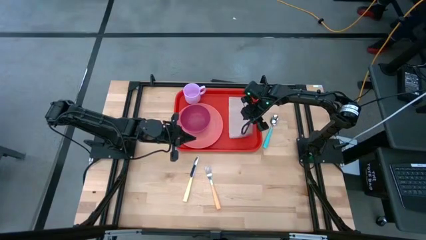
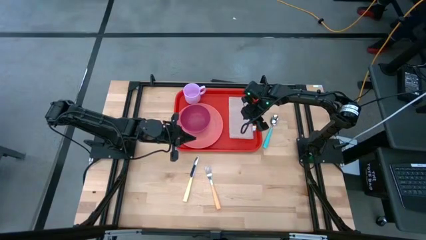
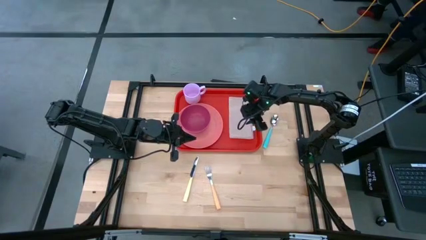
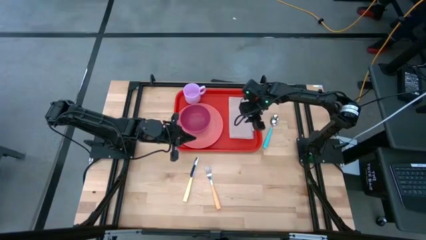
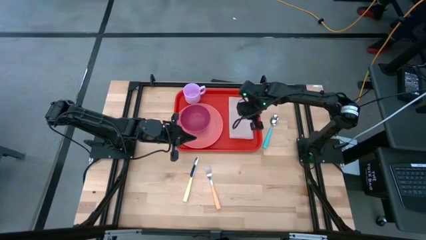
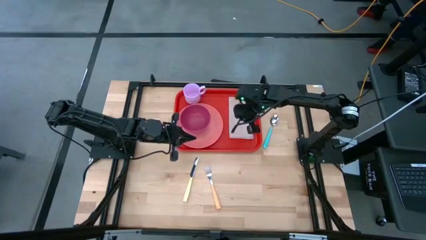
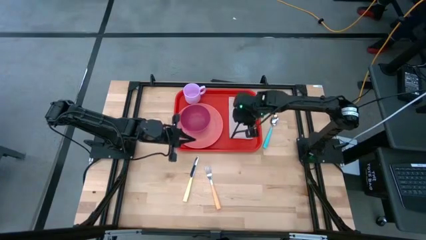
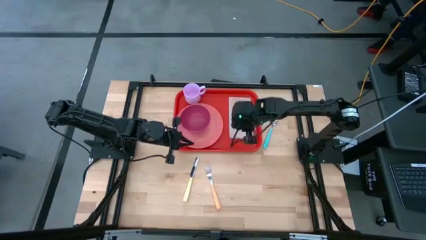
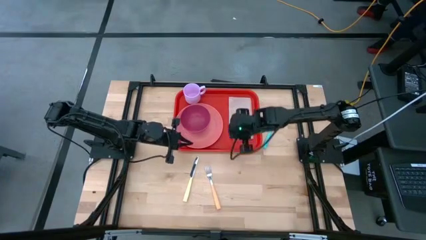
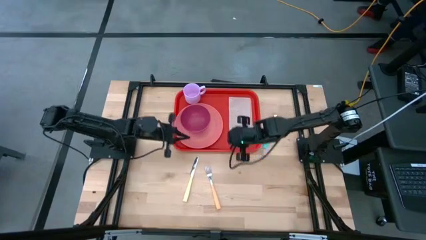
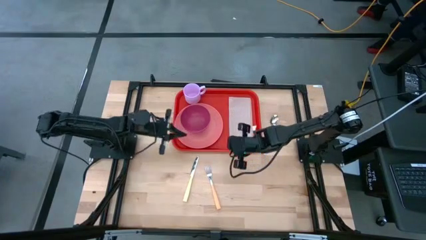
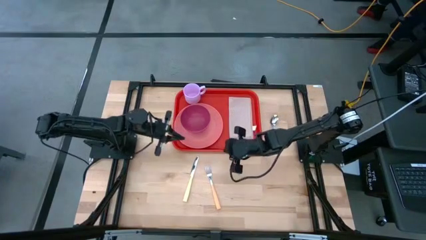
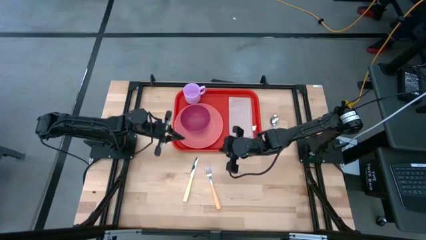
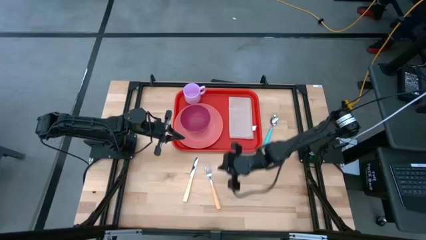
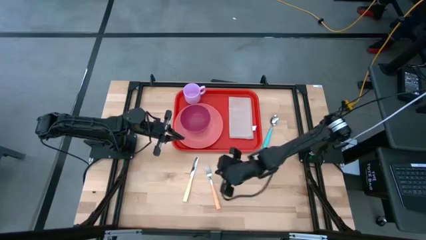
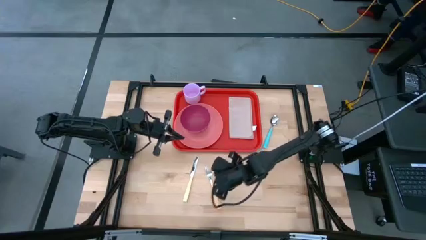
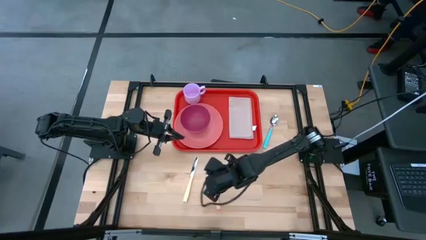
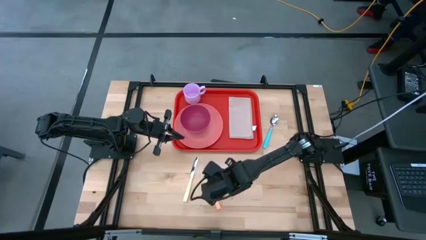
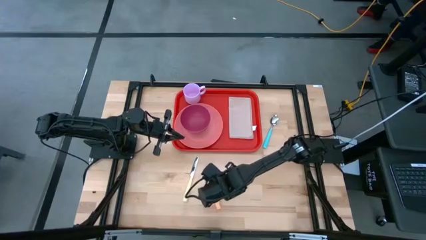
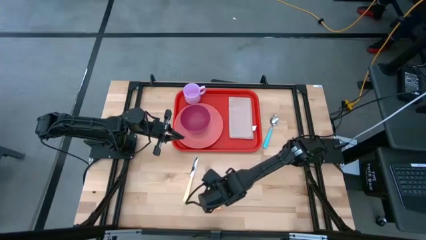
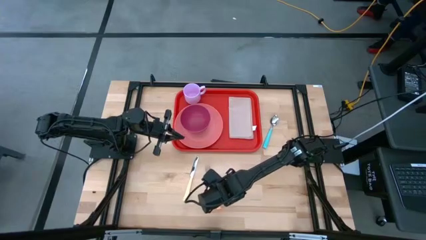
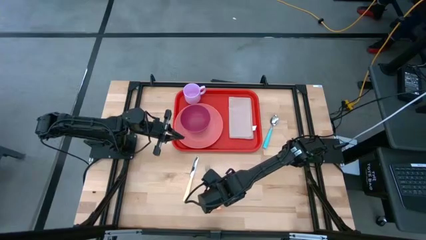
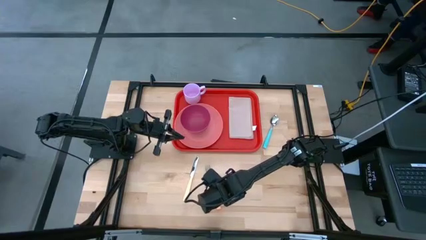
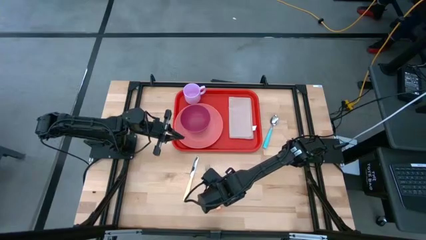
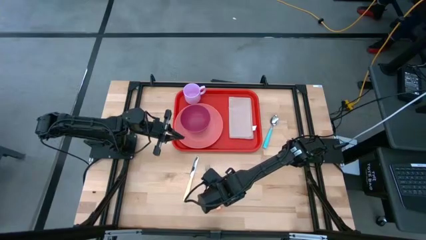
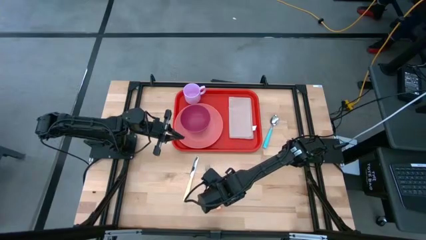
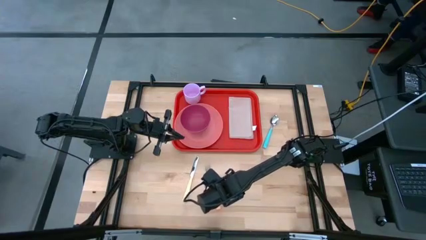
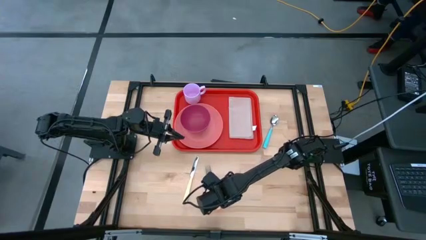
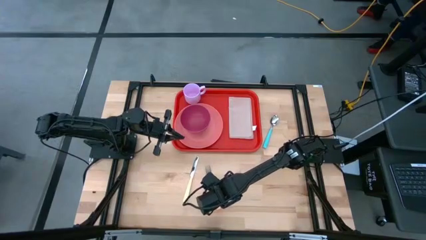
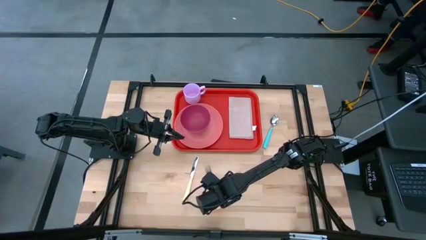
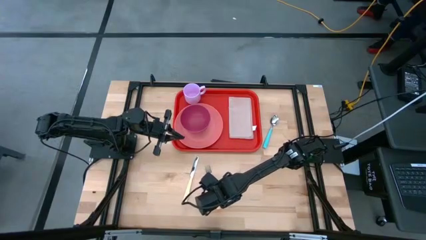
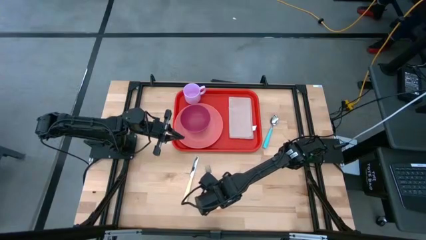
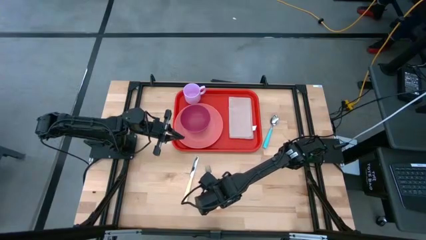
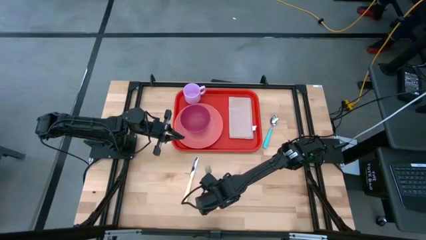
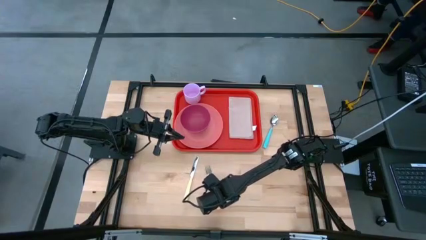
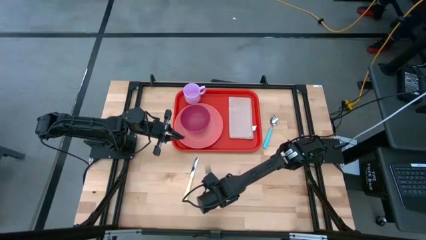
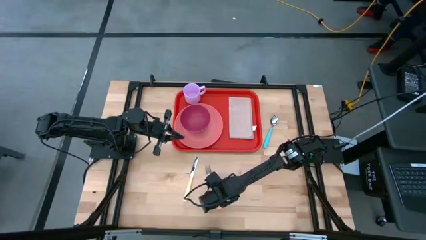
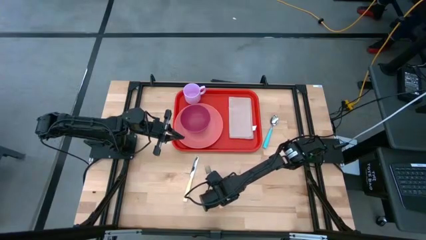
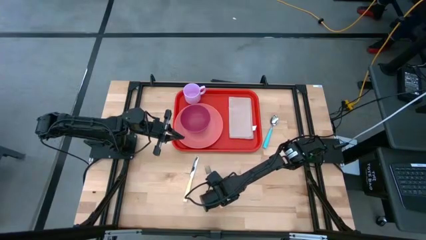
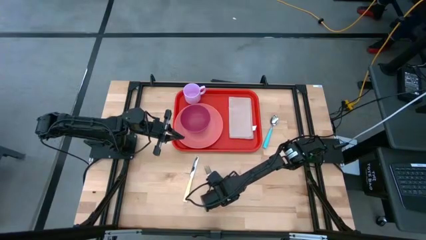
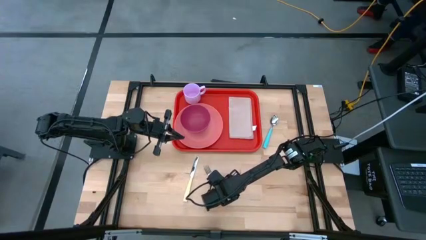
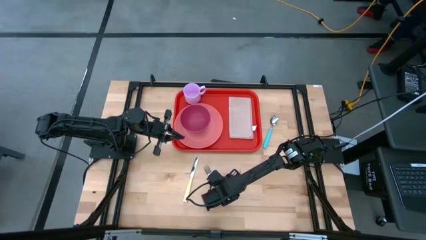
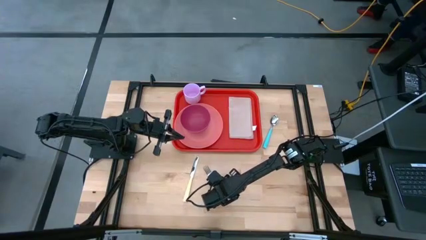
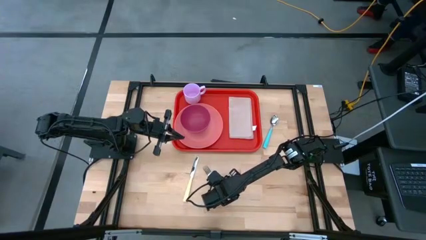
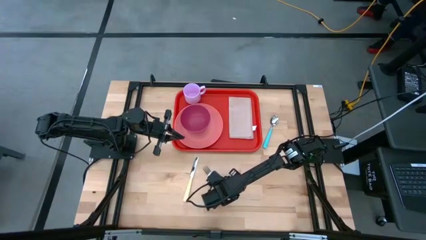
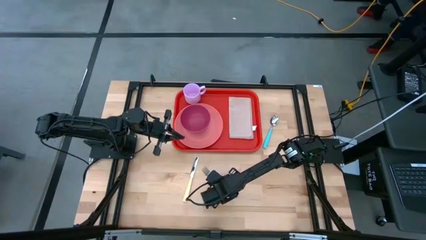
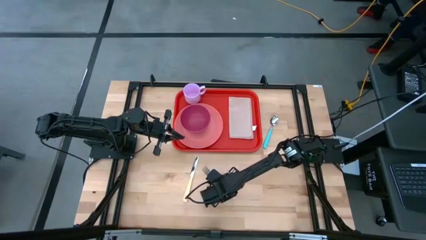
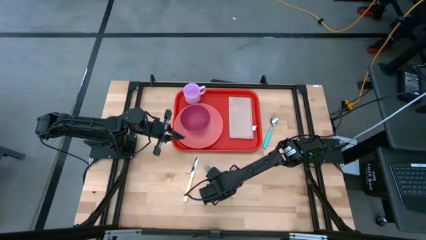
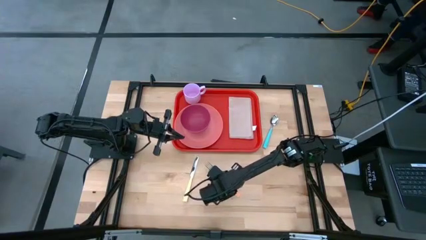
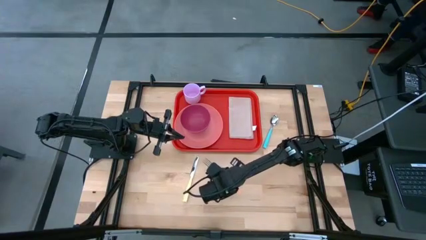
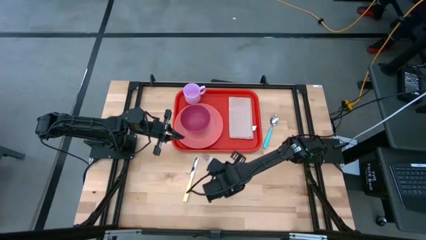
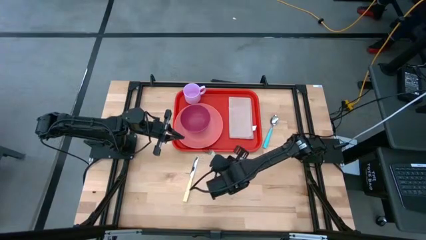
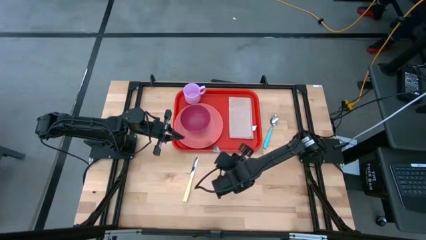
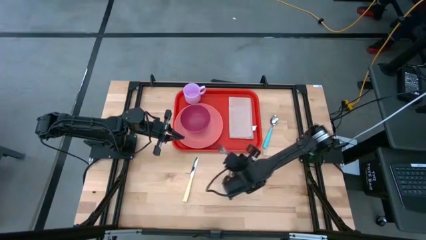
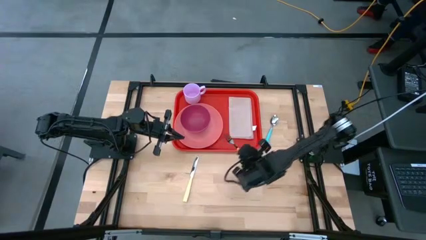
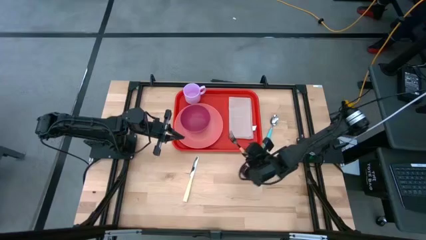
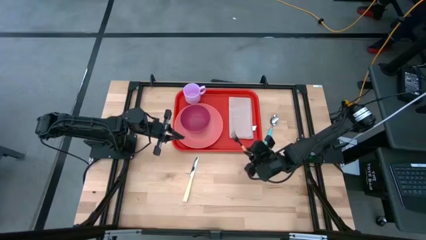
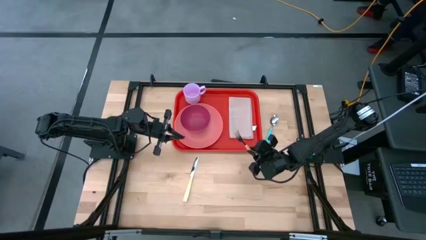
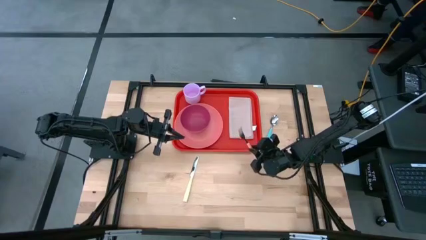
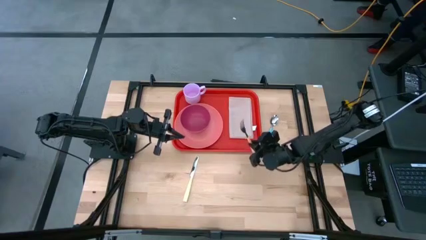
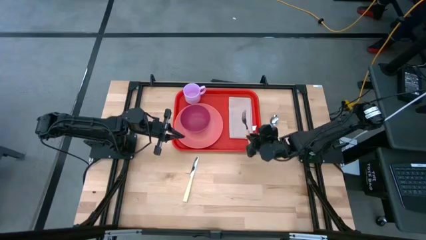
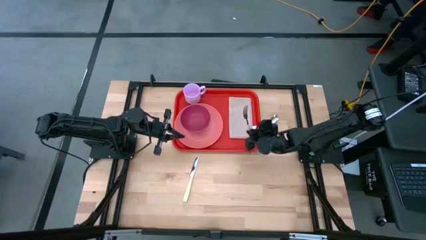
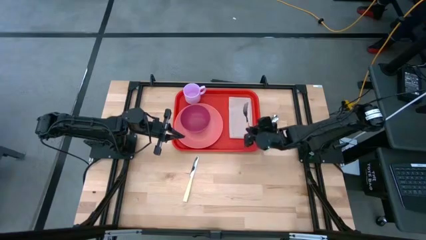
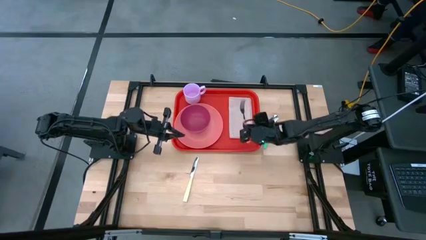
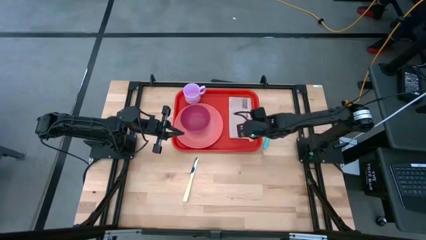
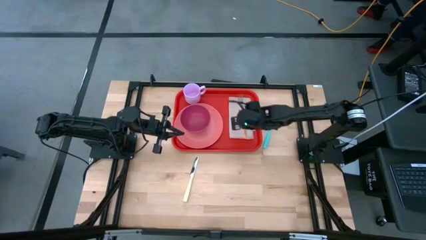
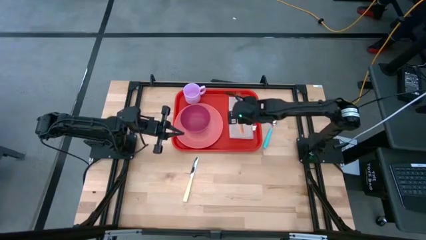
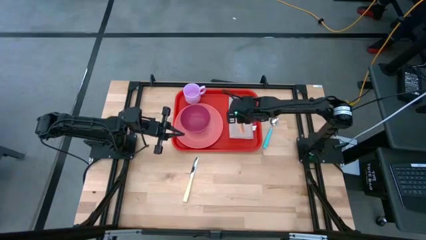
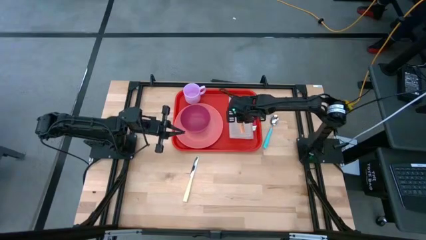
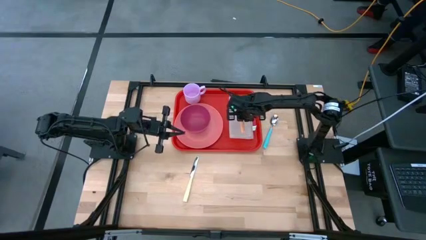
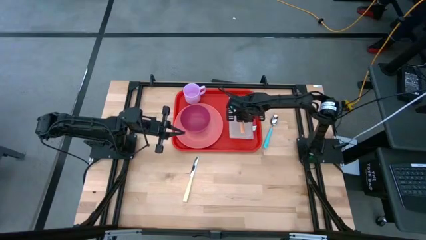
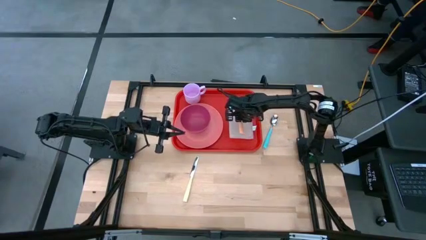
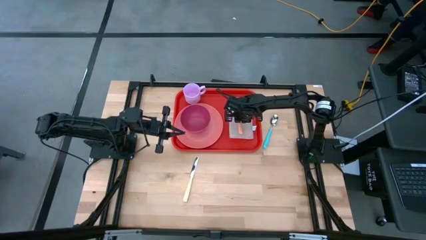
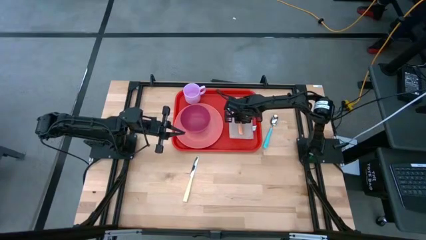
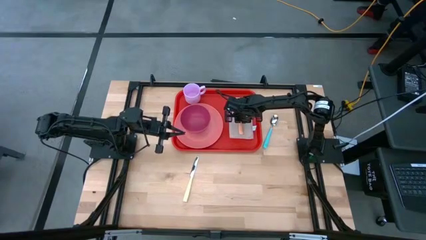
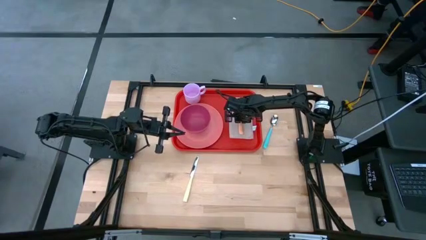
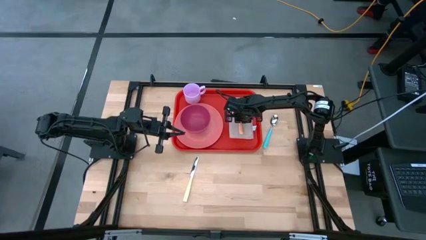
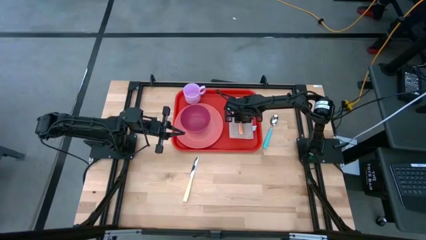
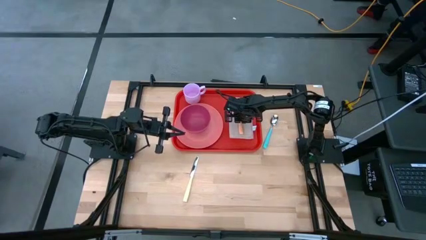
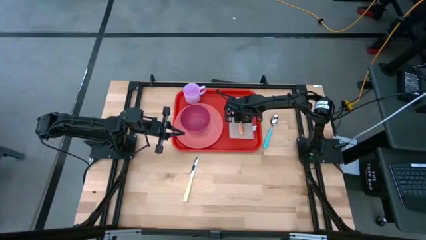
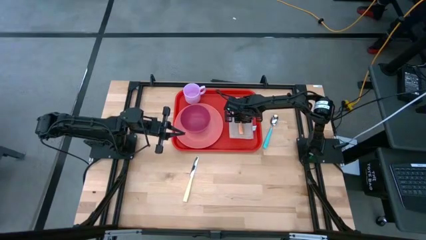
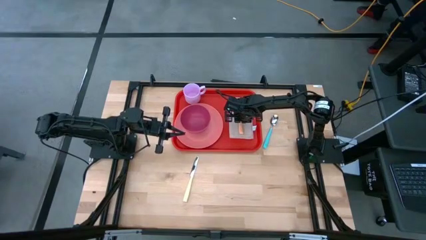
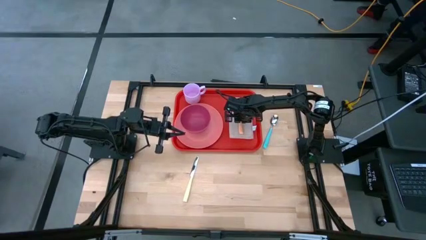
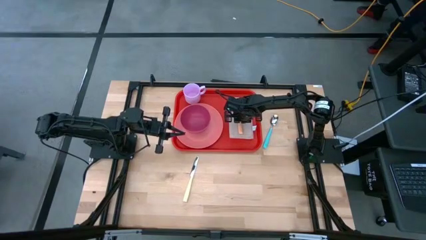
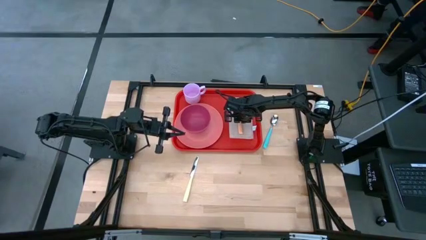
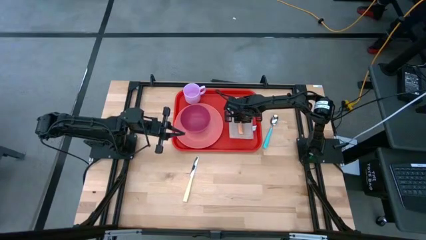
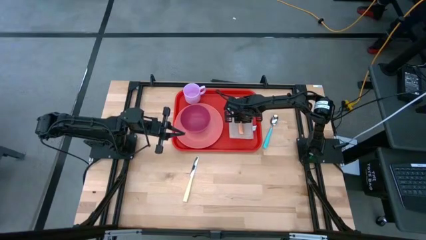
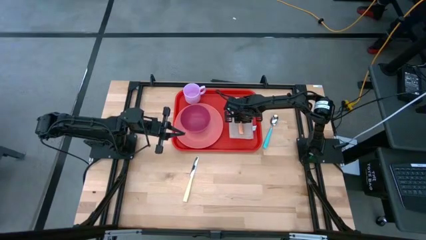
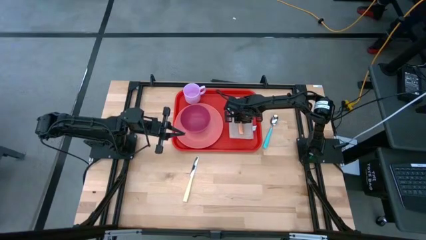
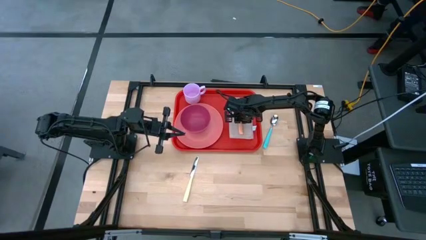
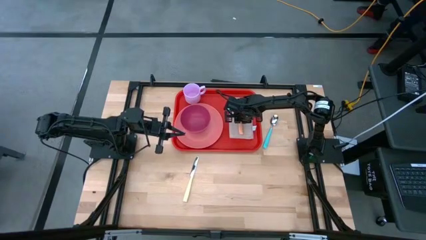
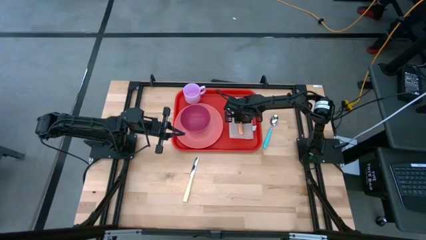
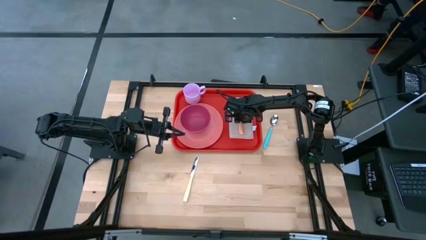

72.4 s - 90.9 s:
Task: Set up tray
Put the orange fork on the brown napkin
